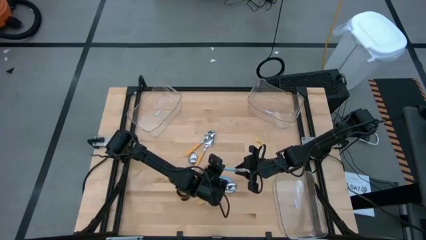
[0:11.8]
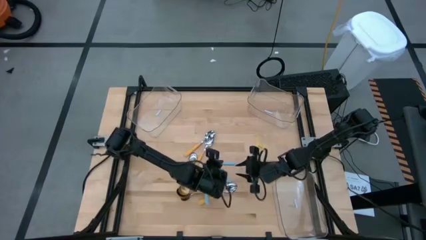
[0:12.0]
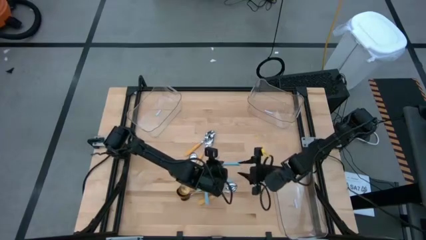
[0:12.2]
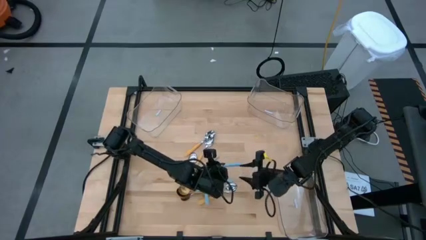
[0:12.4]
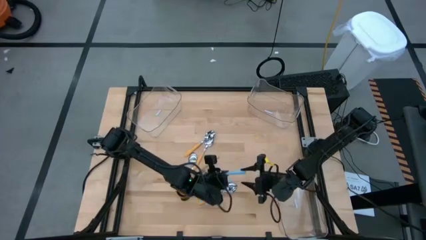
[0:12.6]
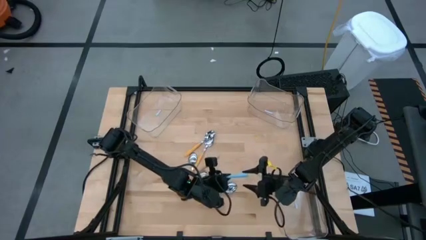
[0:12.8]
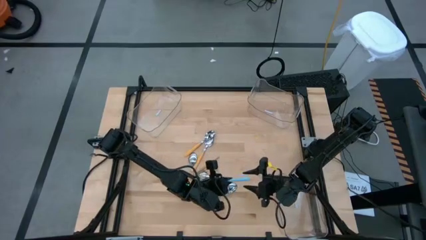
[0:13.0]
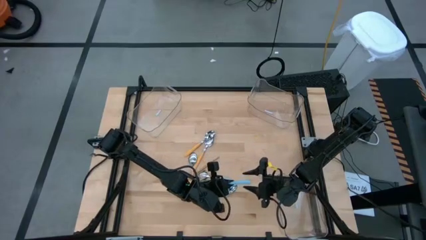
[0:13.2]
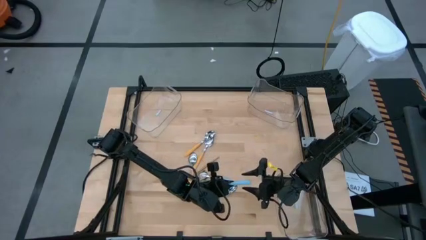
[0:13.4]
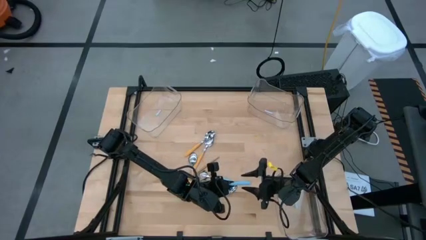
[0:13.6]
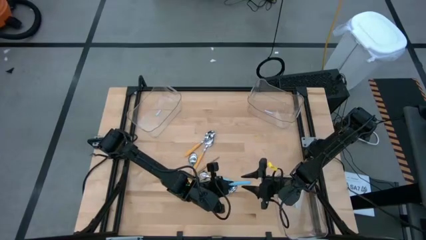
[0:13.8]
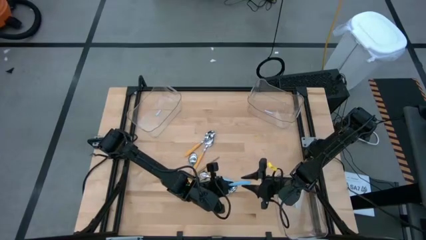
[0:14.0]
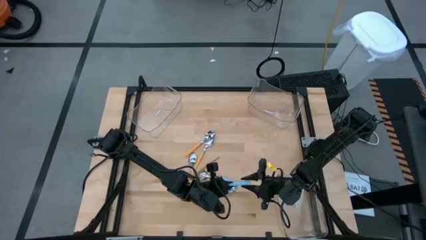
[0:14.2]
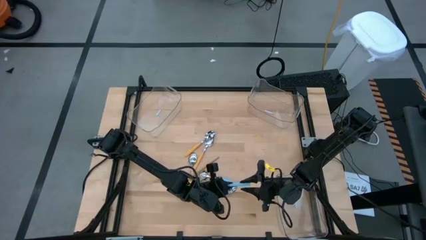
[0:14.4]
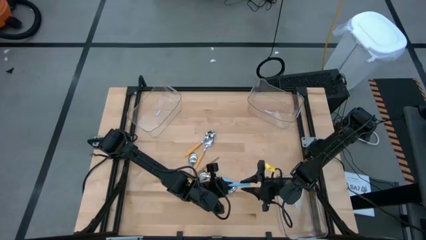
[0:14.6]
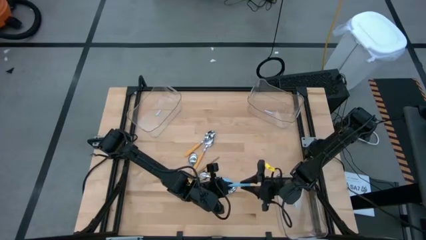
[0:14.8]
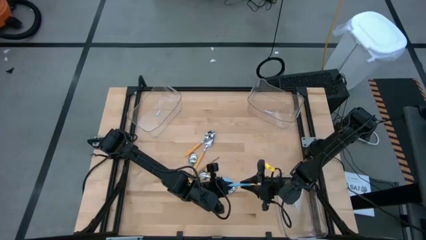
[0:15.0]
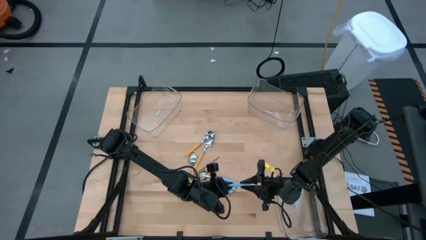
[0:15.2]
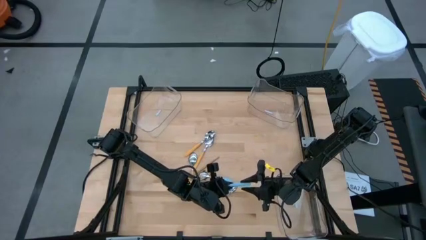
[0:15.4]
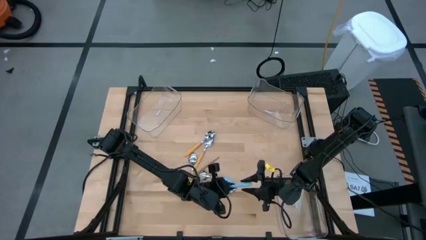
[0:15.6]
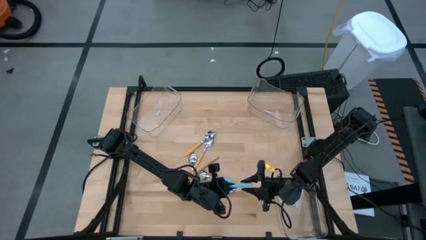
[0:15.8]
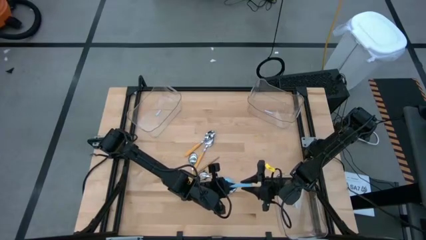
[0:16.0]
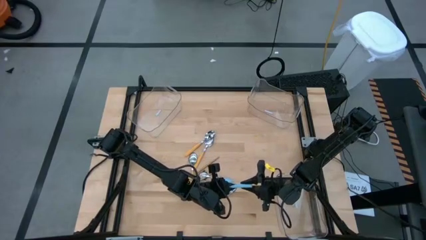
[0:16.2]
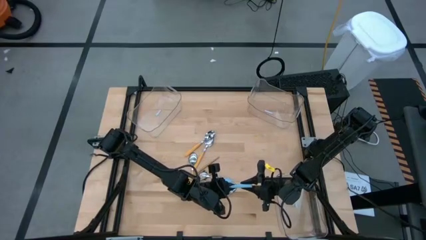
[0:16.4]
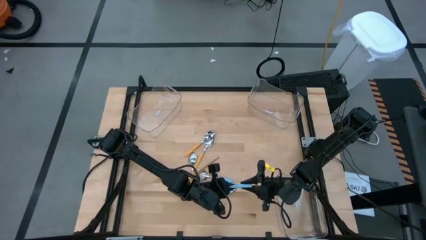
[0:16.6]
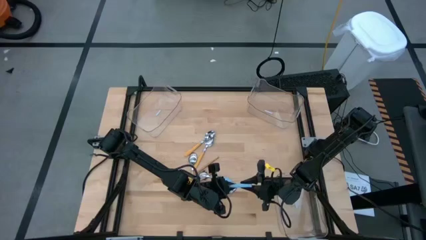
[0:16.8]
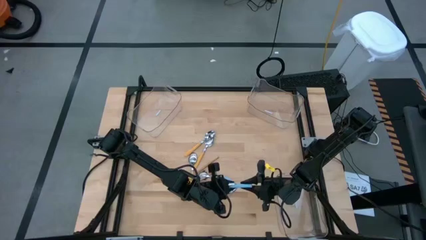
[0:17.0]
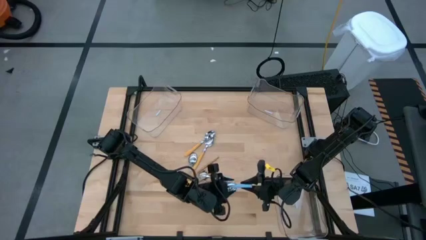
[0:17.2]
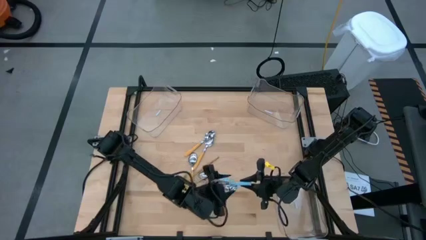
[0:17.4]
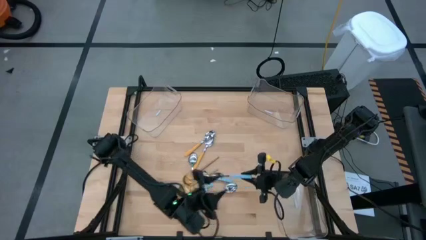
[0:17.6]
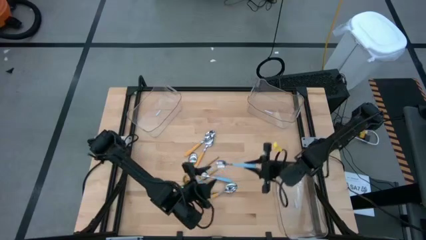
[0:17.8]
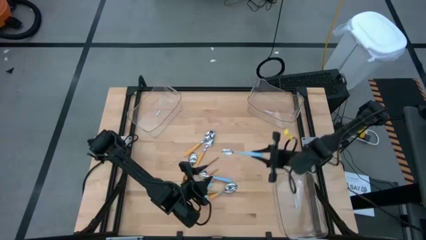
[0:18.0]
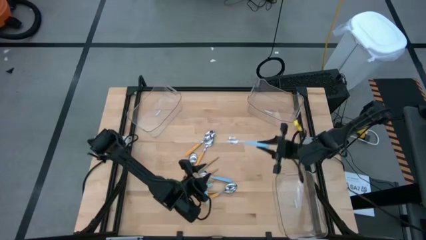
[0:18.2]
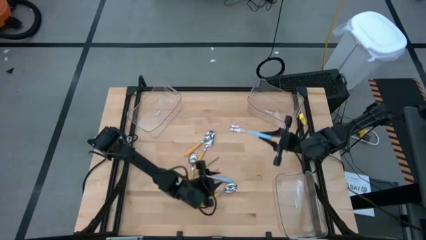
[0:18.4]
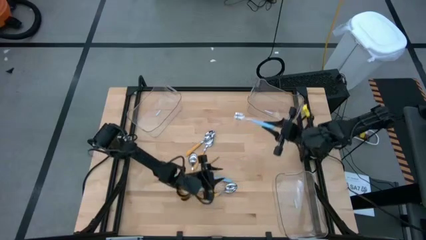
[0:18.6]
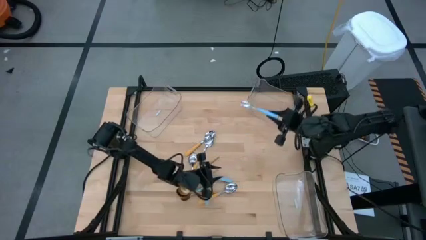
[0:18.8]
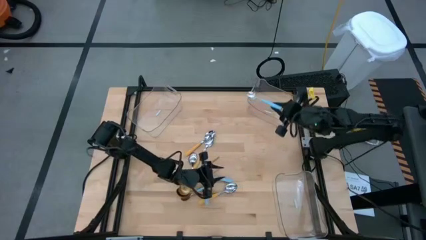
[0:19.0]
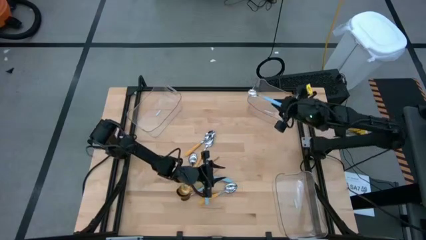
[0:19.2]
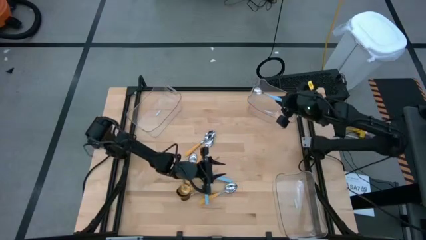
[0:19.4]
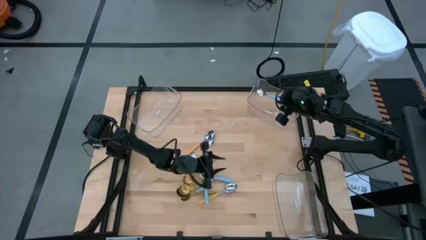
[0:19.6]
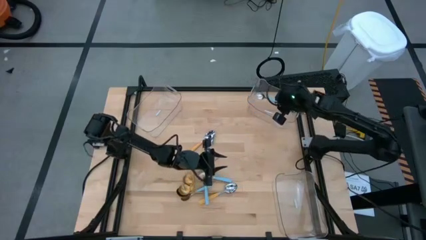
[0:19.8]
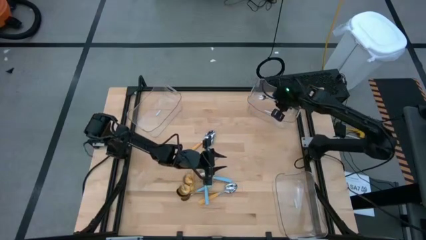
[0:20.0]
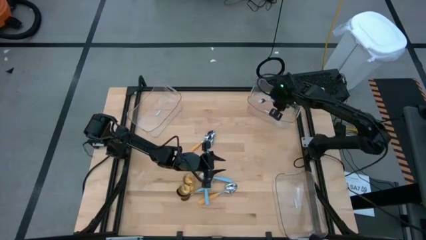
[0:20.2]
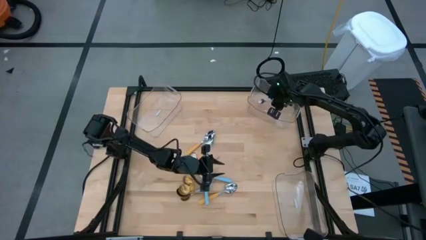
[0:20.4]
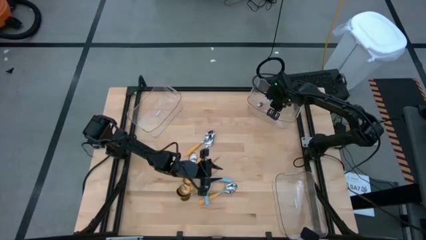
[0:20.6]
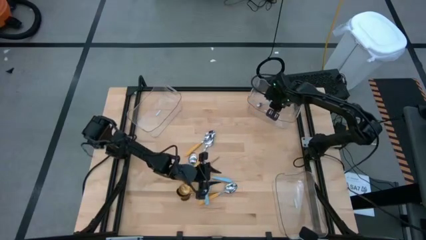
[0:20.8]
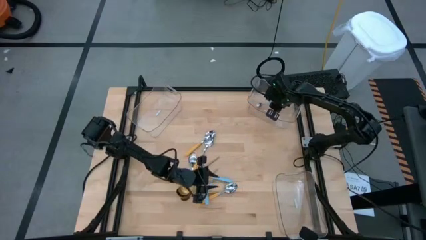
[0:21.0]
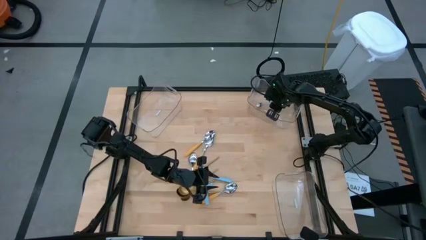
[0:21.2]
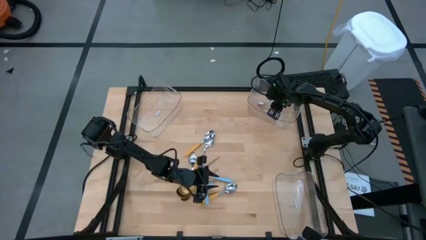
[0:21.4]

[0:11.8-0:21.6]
Task: Sort silverware by color (type)
Put the blue spoon into the top right transparent bin

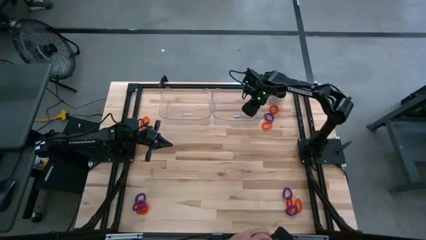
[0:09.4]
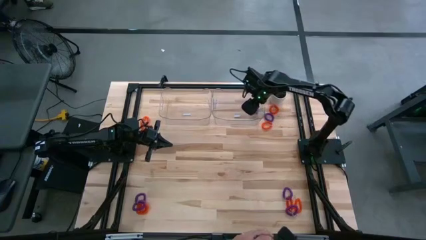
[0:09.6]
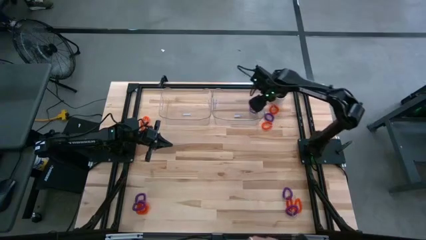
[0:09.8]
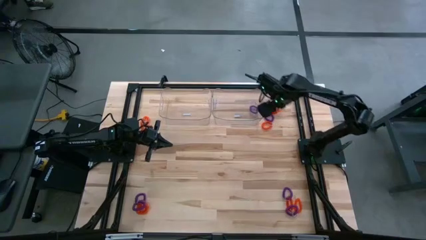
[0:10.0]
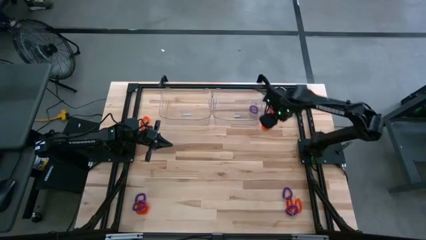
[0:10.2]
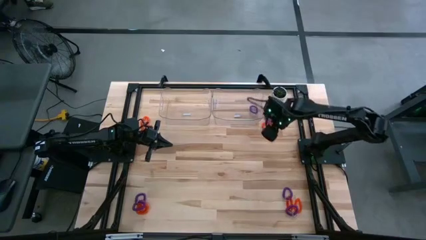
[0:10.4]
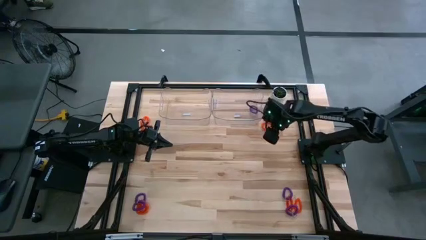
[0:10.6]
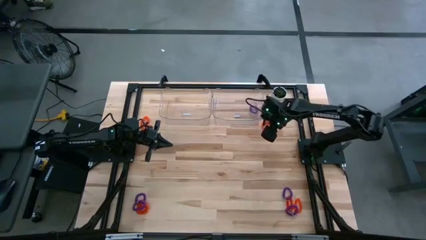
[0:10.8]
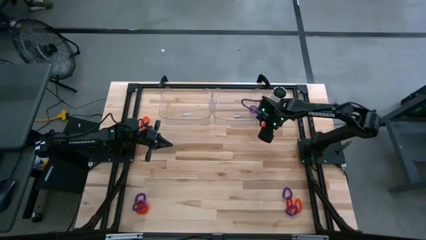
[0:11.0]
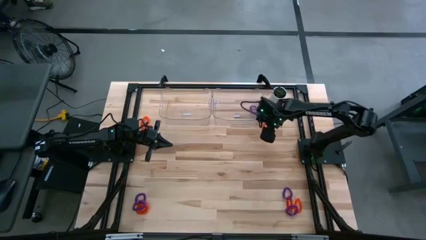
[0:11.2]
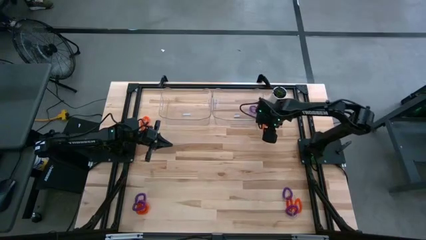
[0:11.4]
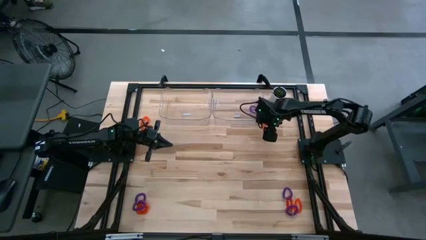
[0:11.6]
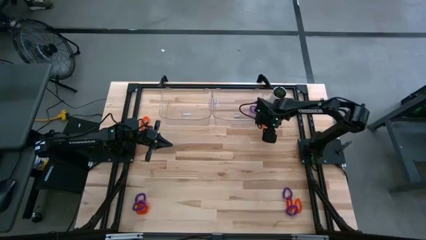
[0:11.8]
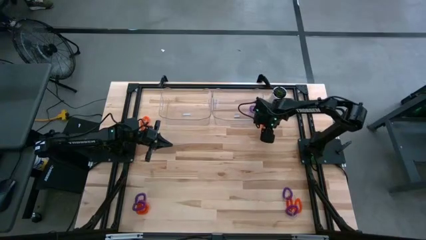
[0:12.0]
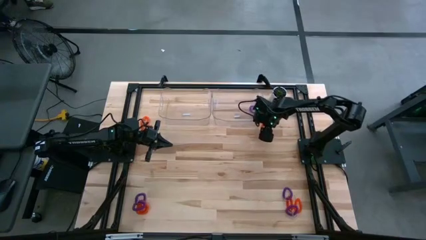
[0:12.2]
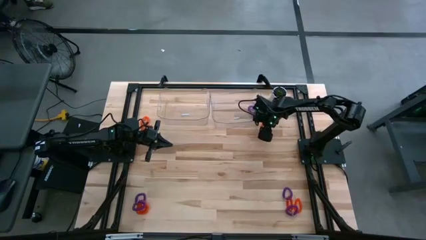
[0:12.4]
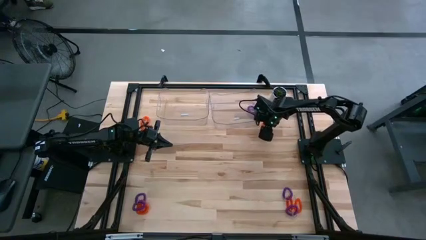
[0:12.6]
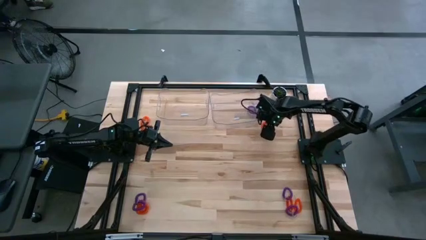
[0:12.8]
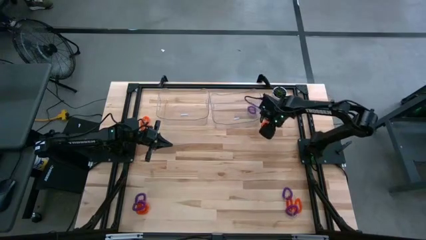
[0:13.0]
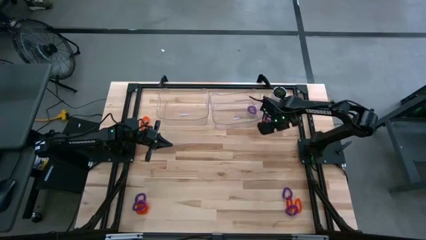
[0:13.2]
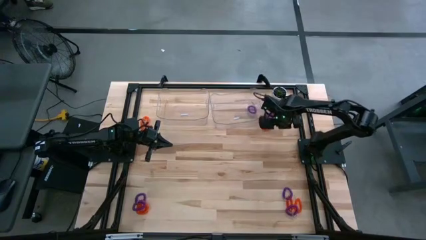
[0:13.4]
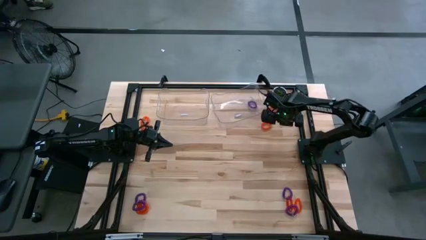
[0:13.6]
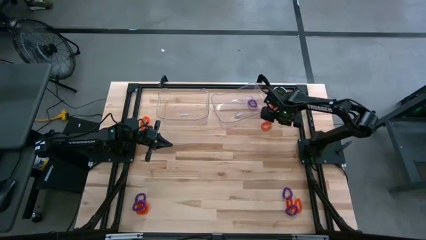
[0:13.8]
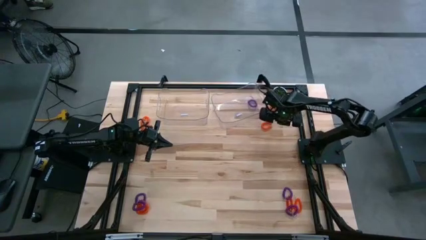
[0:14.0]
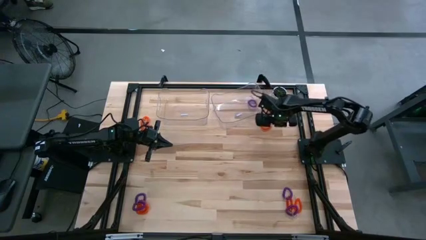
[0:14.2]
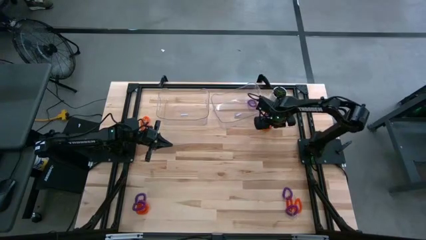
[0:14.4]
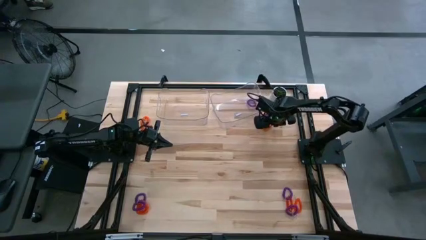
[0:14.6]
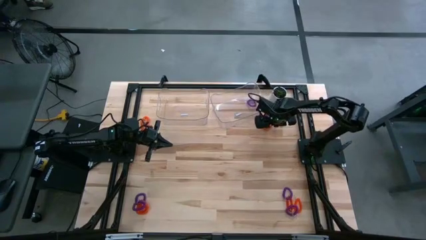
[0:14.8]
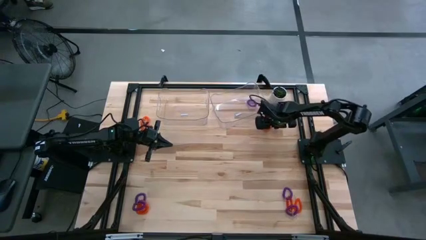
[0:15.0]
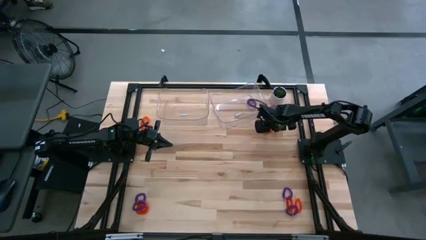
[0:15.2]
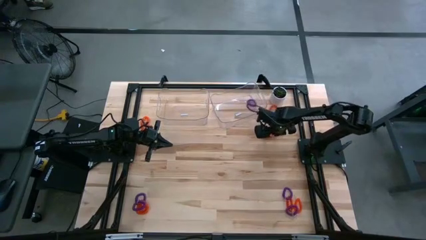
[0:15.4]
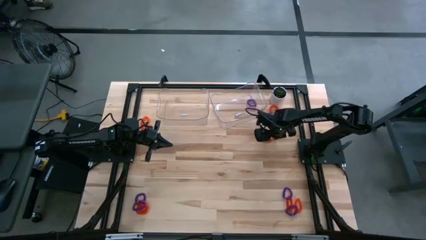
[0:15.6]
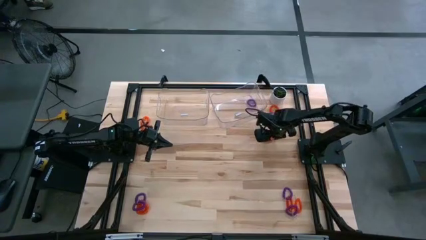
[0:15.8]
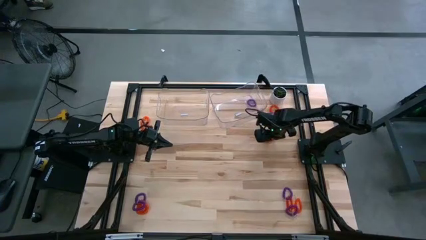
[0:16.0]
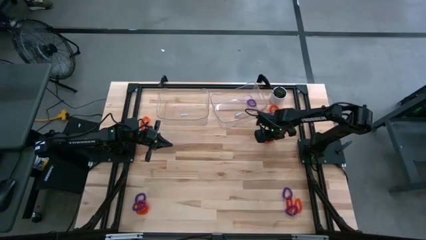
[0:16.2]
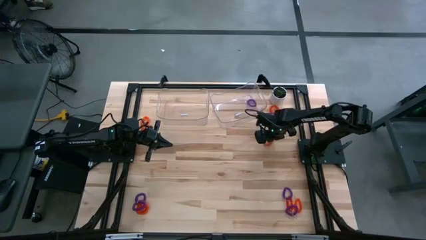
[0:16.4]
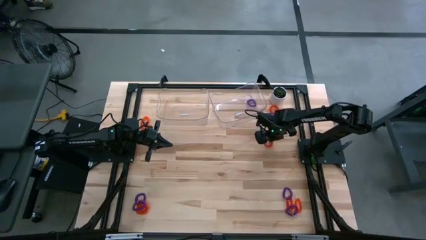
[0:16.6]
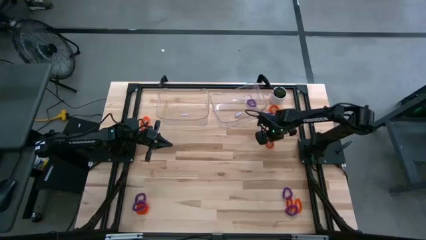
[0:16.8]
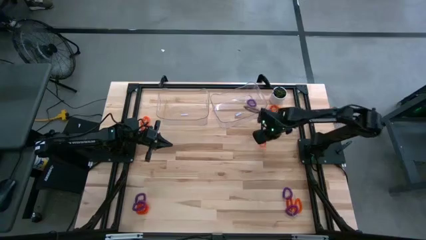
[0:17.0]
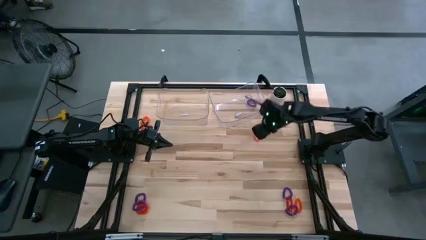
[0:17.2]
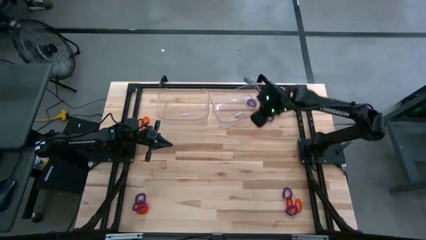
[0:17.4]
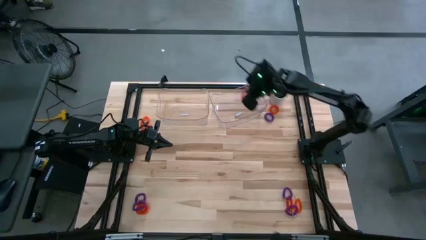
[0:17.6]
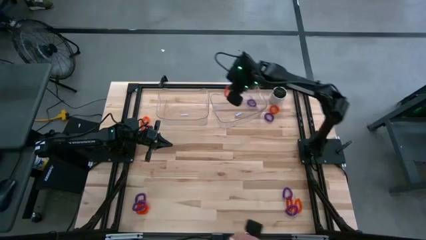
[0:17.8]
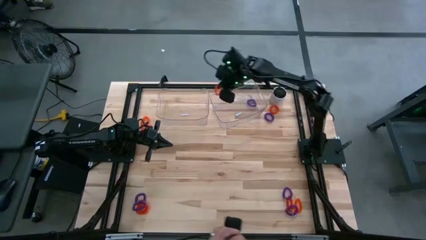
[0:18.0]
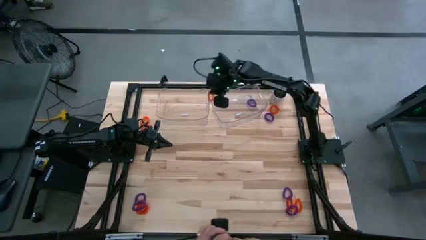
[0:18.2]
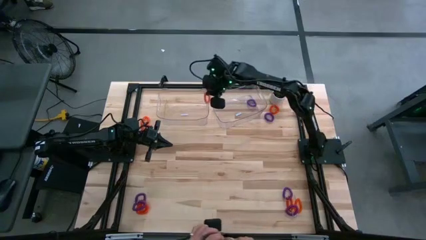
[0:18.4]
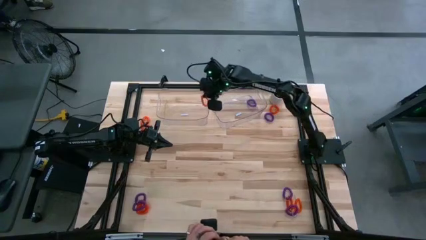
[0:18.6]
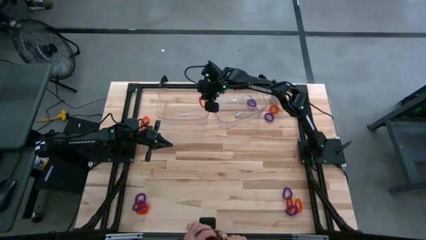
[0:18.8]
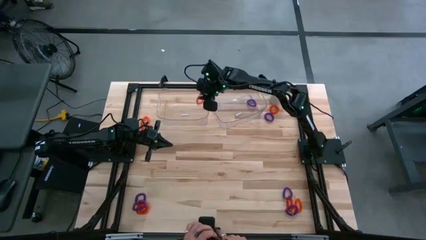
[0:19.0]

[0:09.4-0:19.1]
Task: Sort spring keychains
Put the orange spring keychain into the left transparent bin
